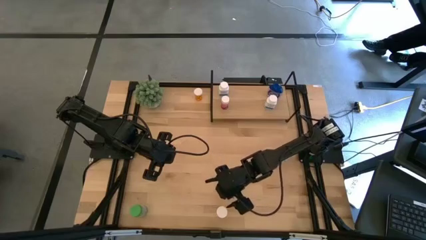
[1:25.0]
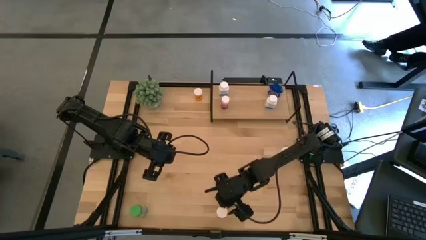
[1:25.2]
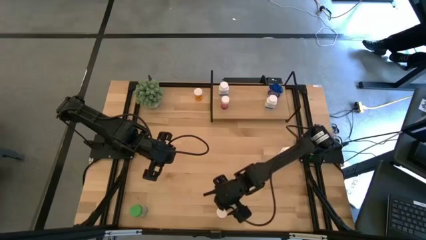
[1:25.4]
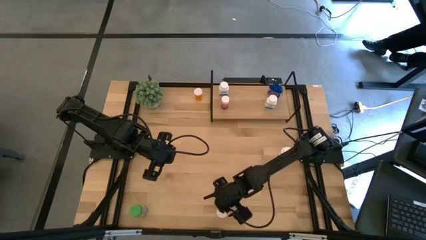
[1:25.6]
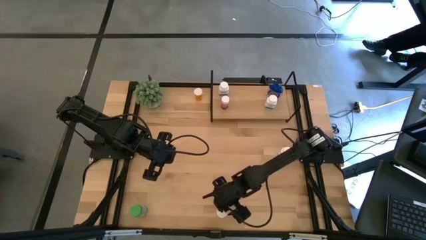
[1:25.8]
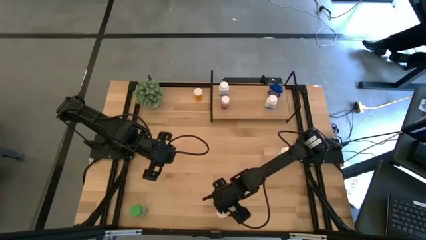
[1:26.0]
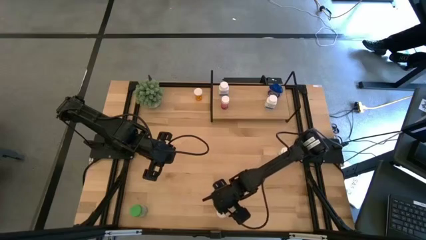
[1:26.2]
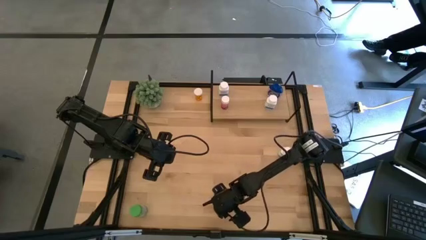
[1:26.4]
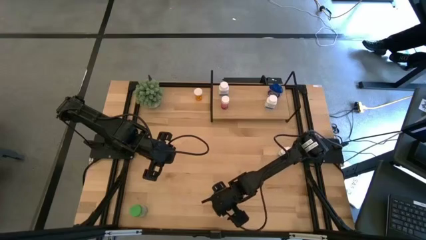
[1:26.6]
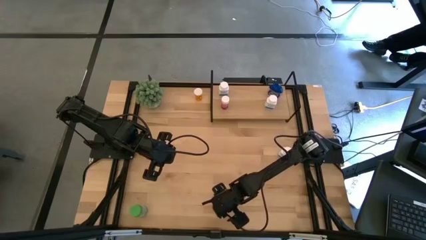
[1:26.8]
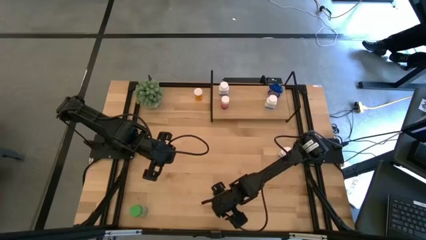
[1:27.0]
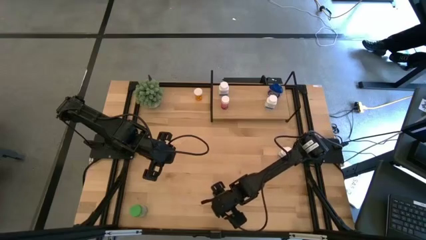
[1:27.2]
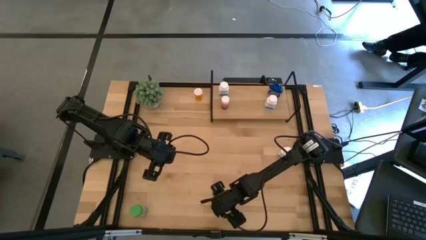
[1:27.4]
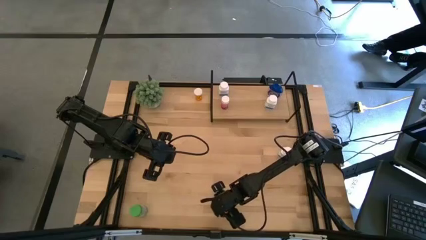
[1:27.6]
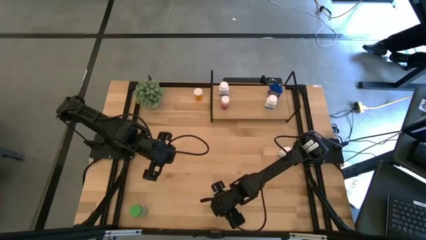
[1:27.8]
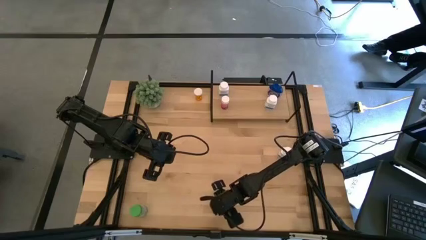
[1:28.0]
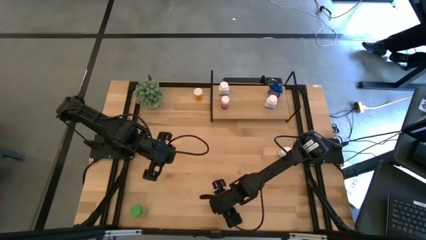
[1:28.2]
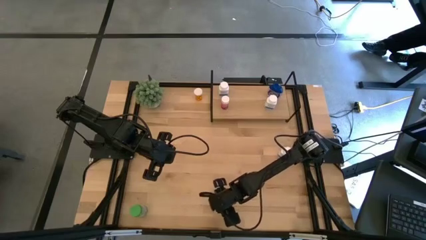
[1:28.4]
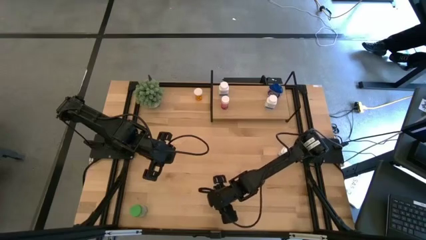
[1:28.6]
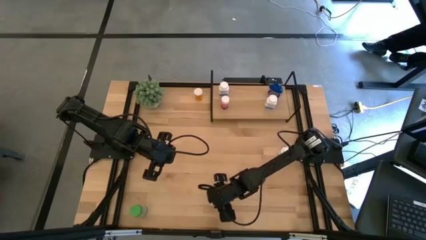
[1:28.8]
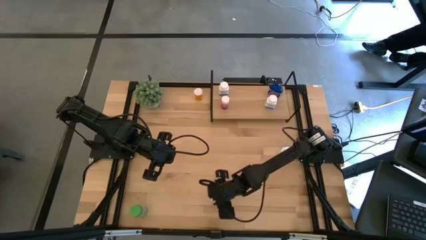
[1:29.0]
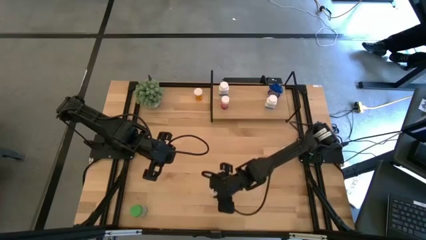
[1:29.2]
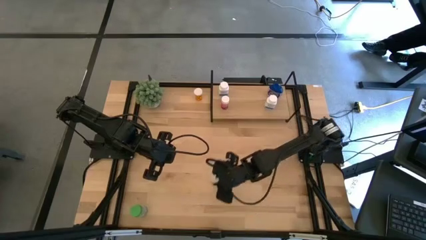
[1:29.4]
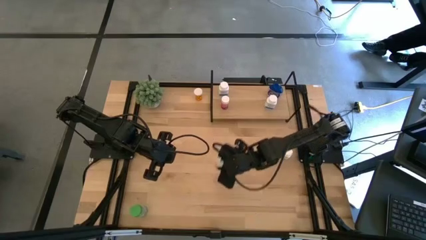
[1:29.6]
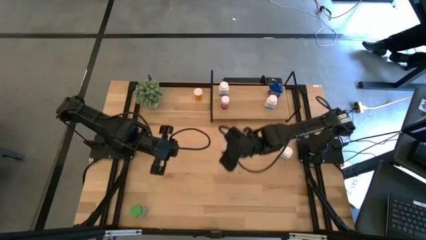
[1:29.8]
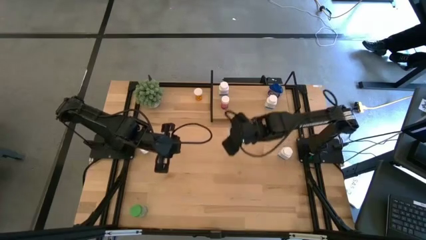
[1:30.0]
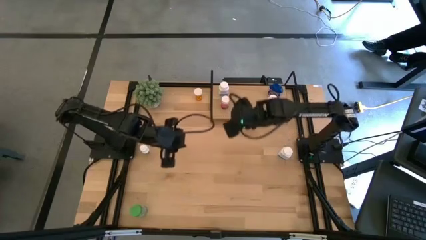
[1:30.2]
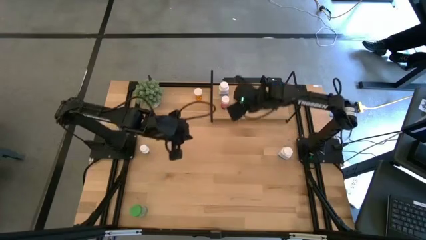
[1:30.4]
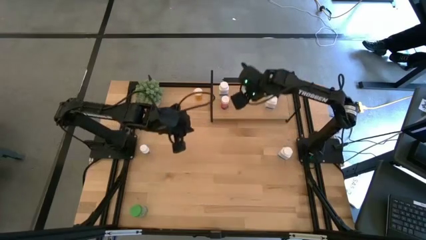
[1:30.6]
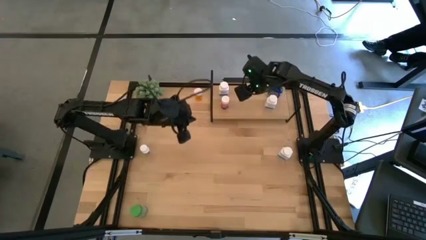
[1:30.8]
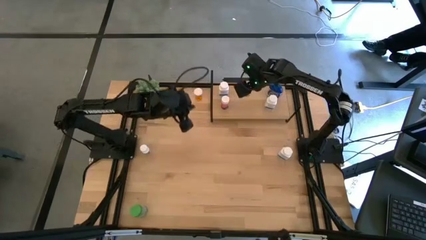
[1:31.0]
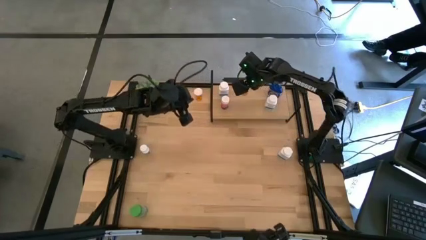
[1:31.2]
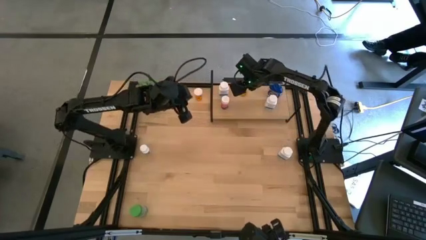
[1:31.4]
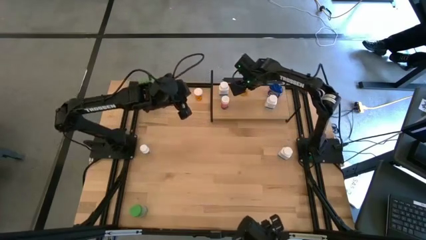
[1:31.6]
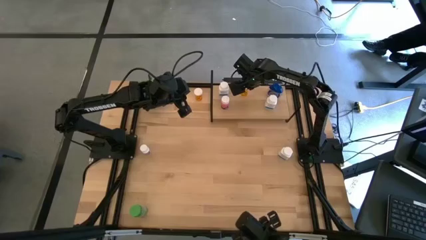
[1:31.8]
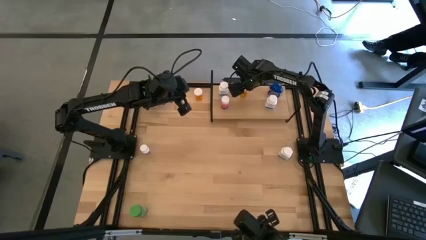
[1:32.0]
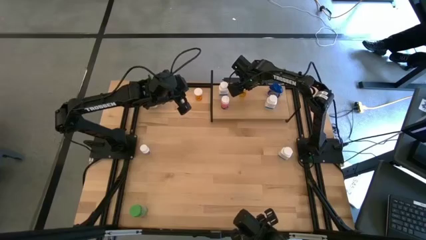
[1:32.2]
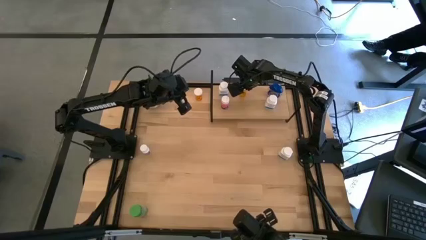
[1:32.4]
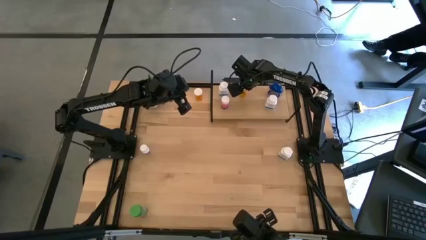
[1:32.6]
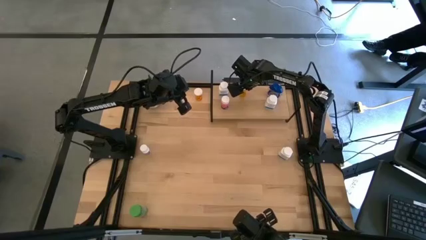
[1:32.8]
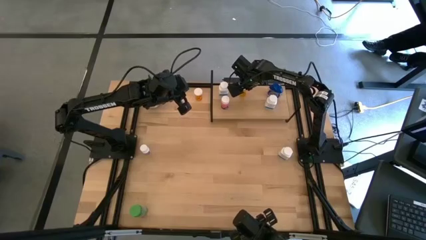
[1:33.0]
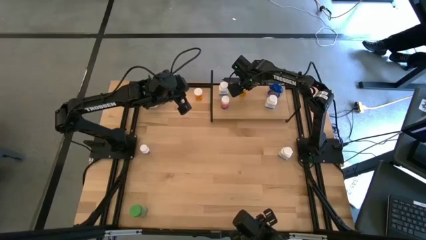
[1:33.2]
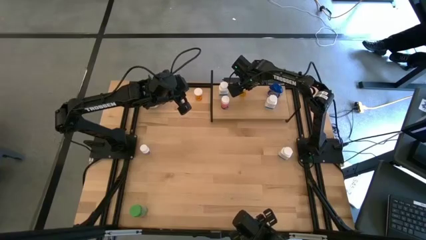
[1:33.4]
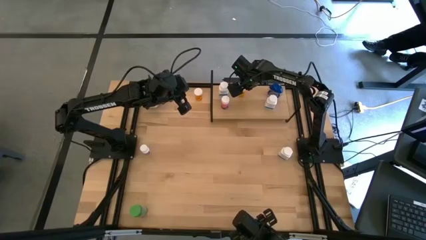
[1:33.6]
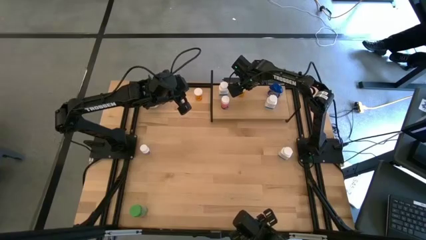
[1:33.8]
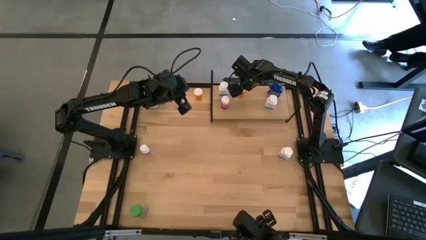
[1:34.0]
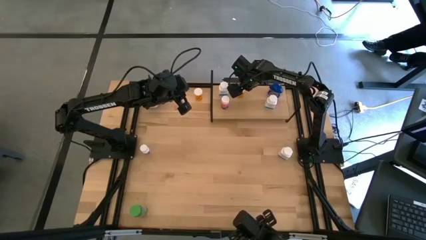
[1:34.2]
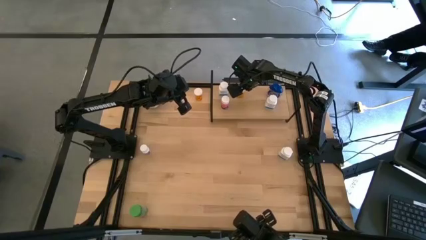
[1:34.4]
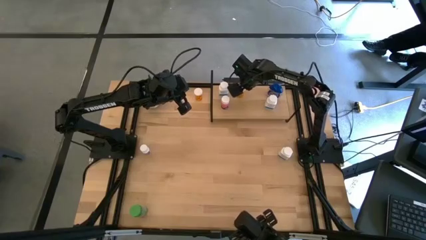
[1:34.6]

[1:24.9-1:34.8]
Task: Pick and place medicine bottles onto shelf by color
Put the orange medicine bottle on the shelf

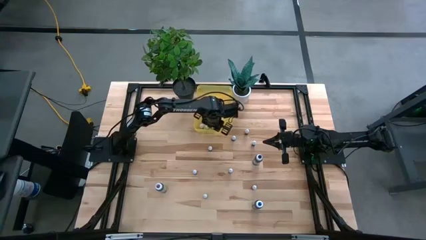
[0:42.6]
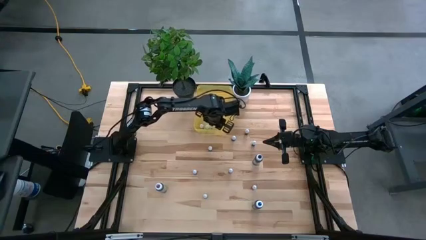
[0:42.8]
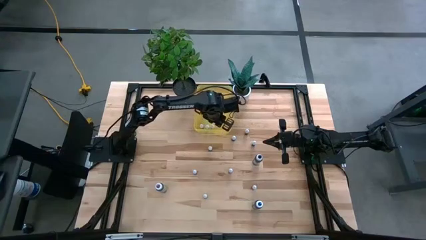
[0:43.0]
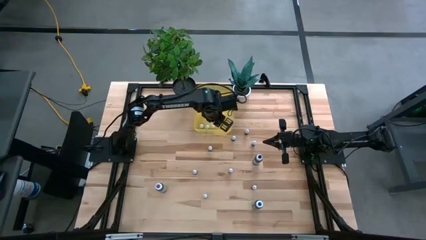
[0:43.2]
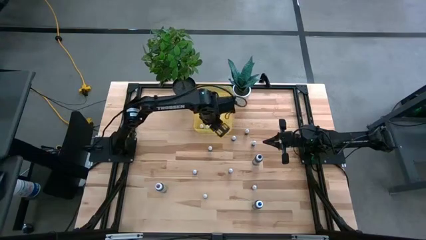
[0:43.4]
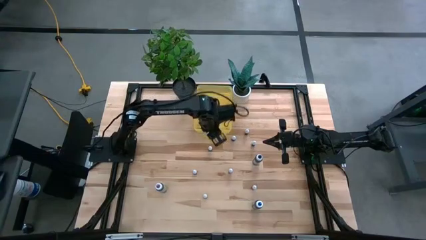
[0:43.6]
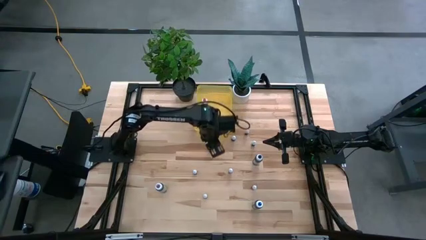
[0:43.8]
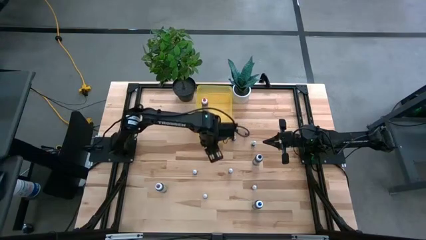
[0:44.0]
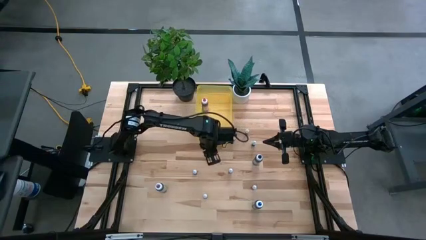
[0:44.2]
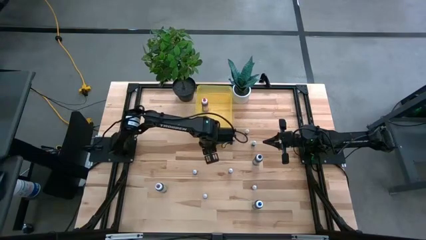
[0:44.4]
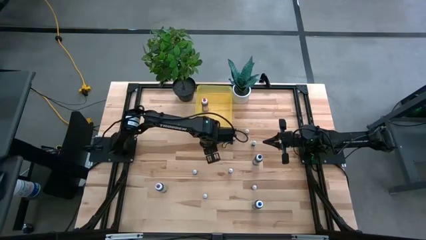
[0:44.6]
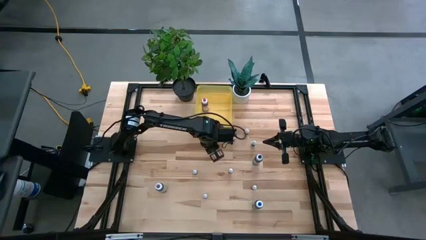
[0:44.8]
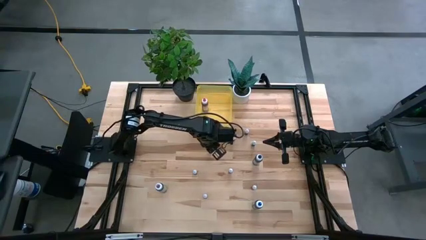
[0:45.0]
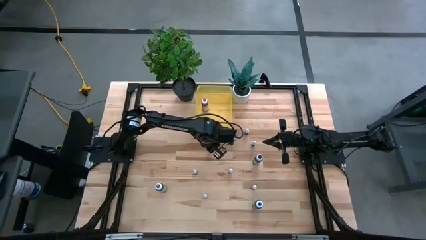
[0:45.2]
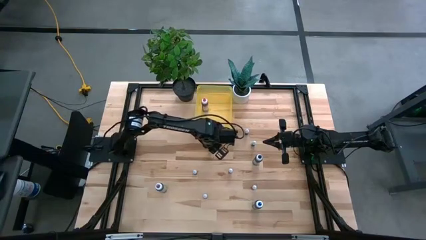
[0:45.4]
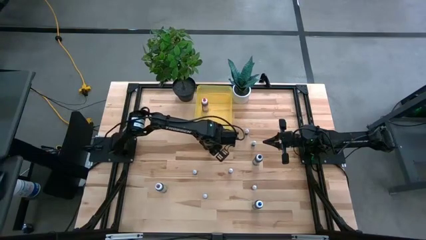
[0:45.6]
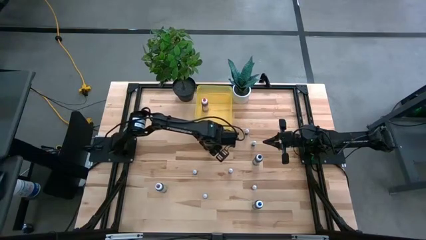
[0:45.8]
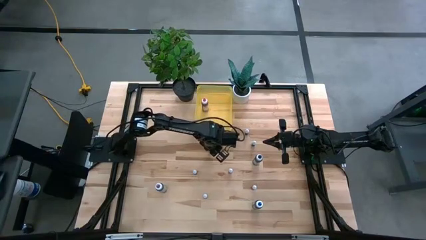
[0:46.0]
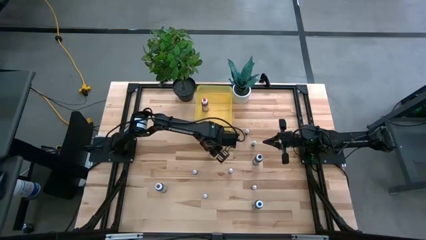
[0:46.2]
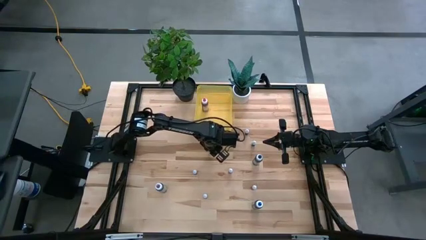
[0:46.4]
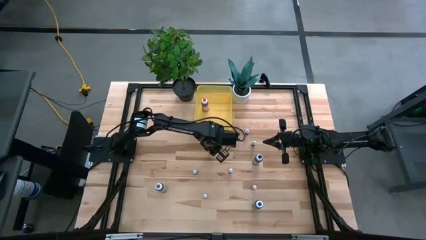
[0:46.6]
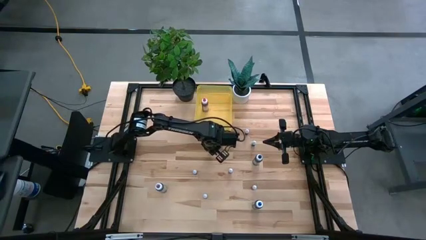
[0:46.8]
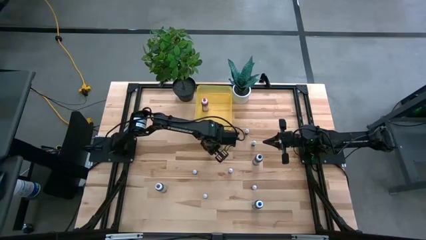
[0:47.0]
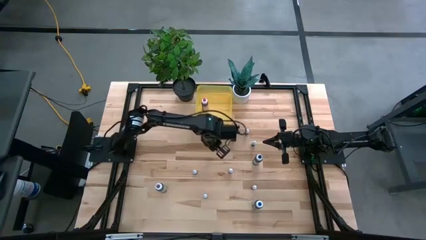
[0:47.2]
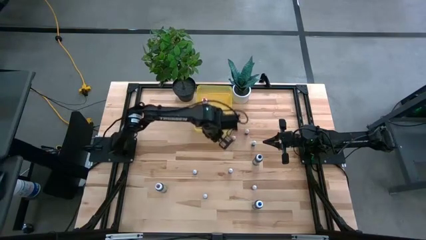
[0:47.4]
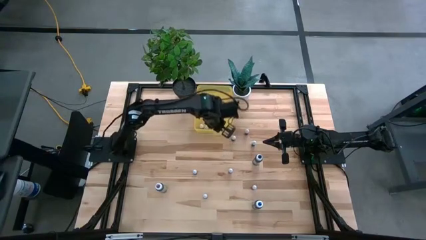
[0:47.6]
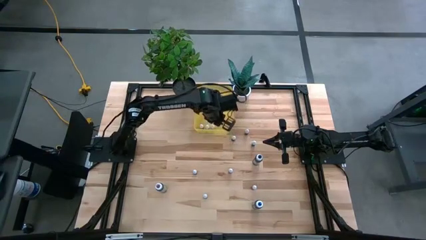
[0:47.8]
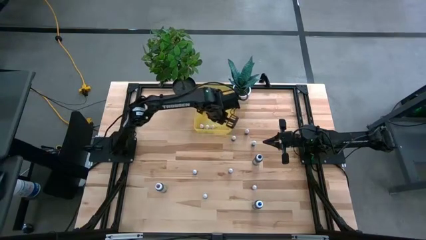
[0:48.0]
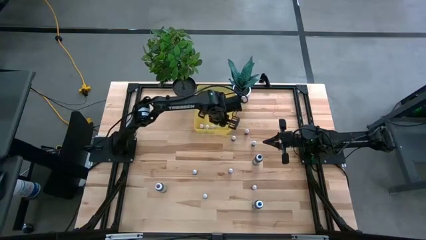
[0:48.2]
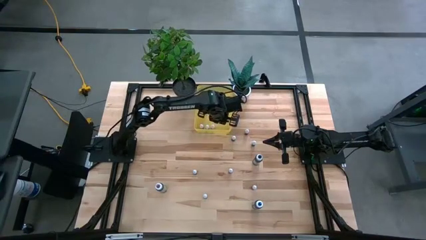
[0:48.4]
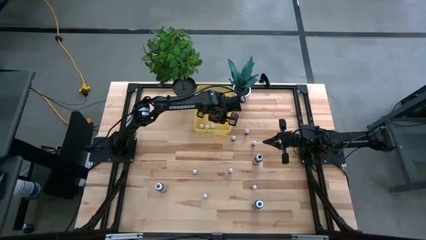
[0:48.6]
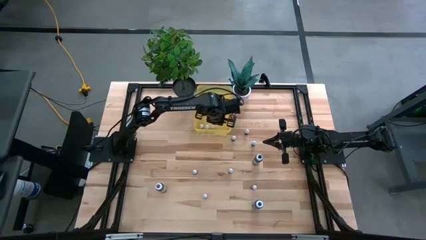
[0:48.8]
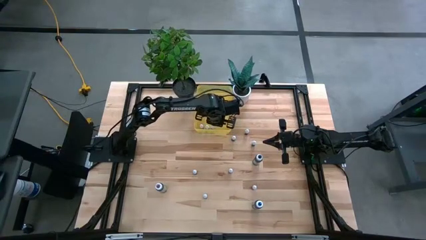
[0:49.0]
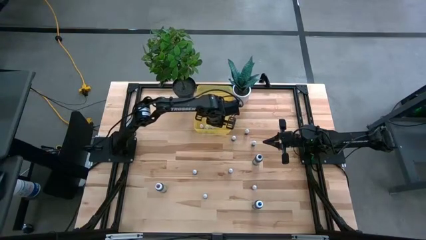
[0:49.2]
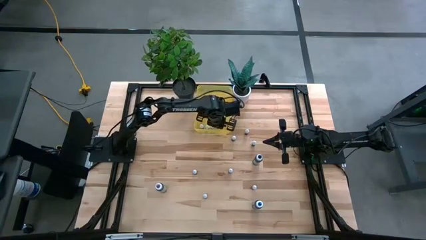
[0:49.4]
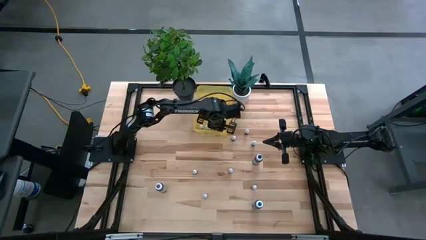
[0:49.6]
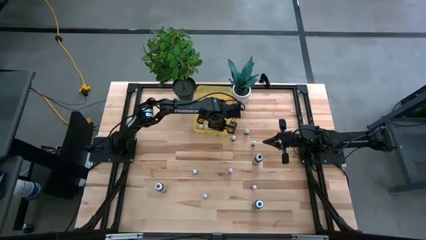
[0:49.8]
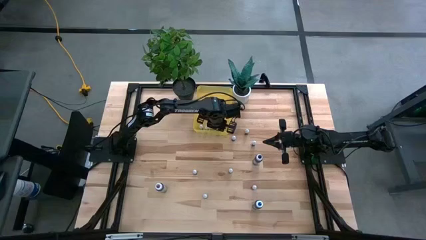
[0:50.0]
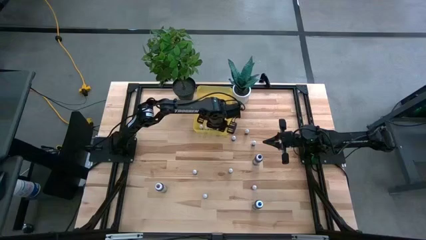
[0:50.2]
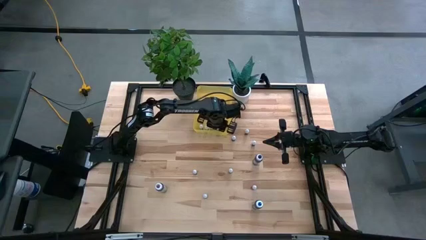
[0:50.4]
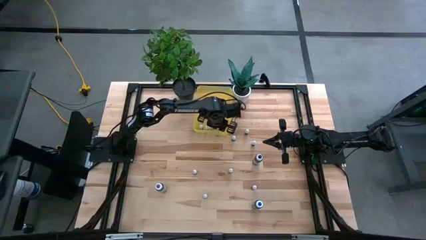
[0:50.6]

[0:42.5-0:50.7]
Task: Pick & Place food coloring
Put the small light green food coloring bottle into the yellow bin
